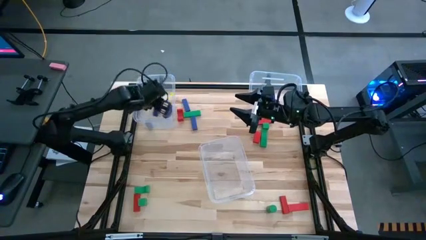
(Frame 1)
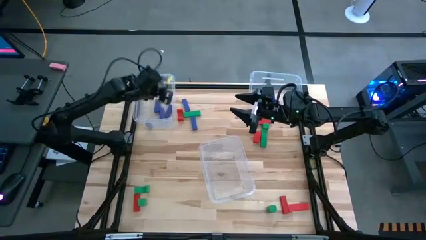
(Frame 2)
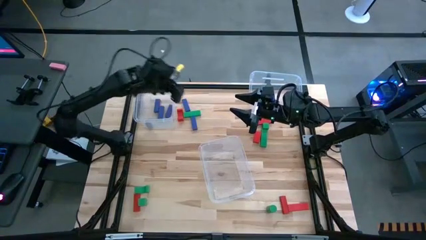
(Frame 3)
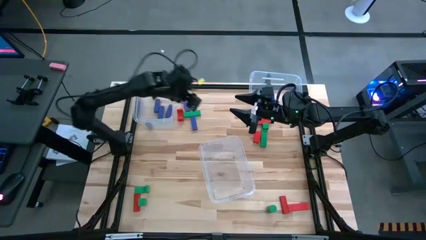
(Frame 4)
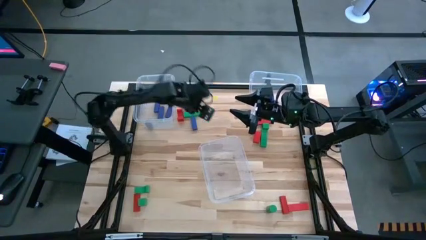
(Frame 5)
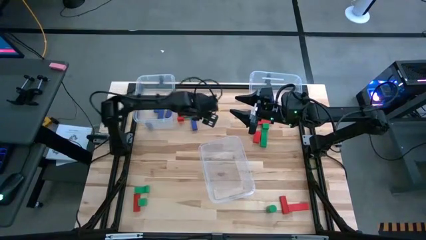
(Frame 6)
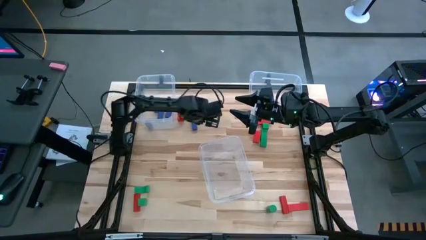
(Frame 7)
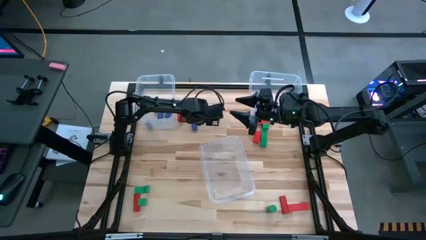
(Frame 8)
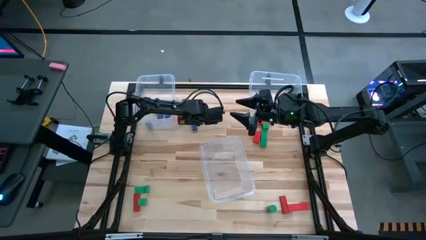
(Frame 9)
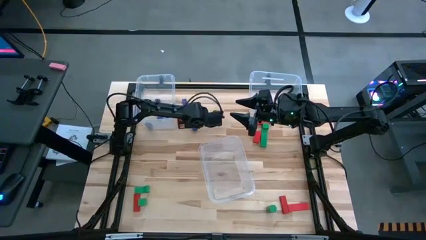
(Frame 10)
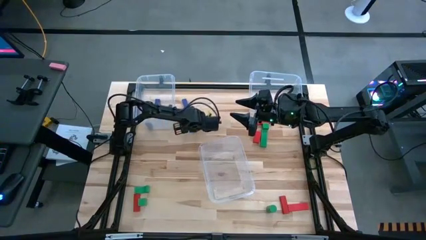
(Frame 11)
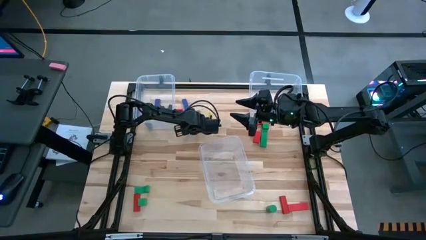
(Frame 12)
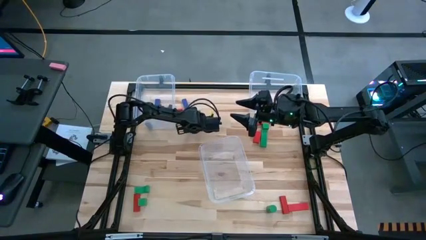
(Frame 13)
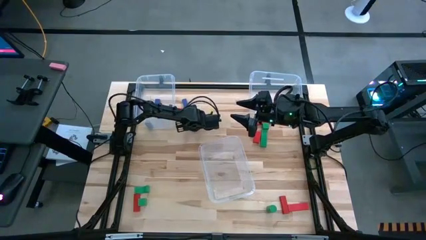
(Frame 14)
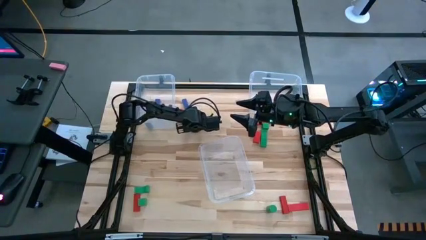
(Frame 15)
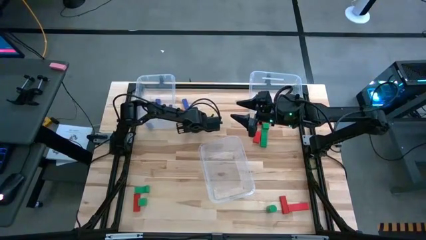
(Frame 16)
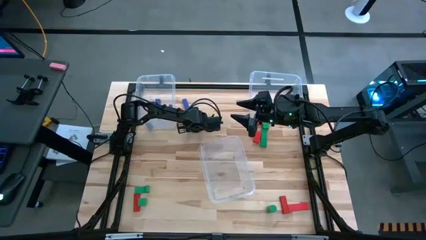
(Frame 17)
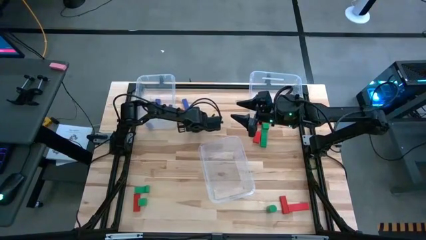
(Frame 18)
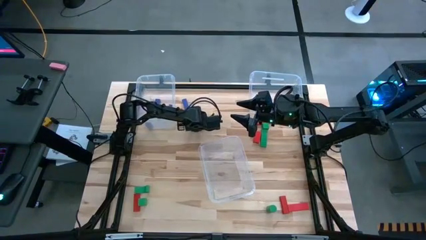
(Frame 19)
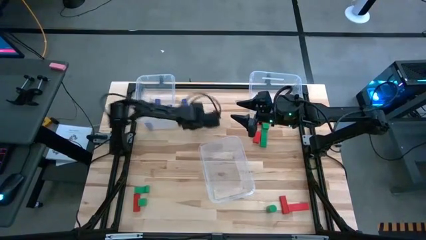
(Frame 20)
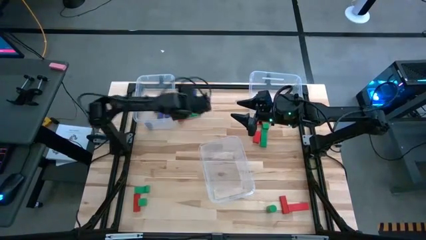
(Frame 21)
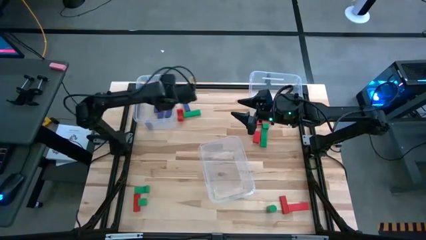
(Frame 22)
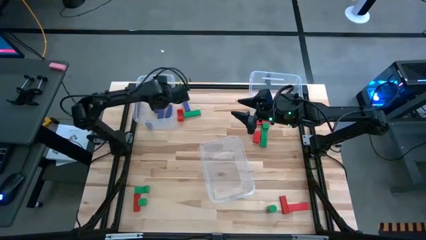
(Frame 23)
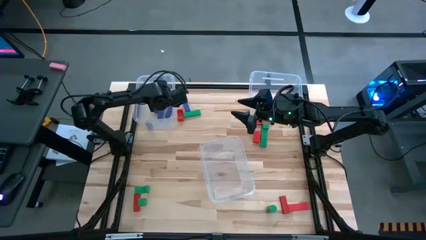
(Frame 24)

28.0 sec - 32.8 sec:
Task: Sort blocks
Put the blue block into the top left transparent bin

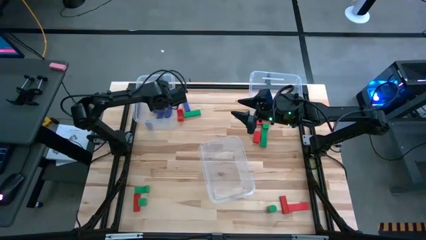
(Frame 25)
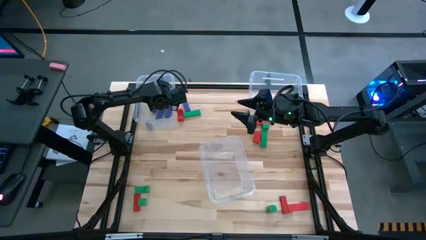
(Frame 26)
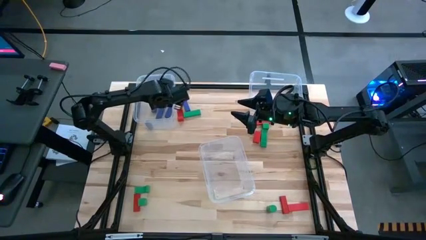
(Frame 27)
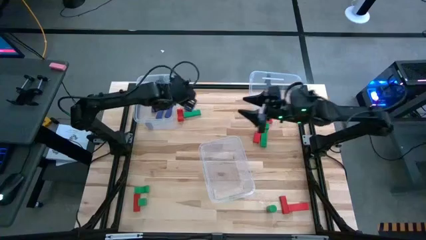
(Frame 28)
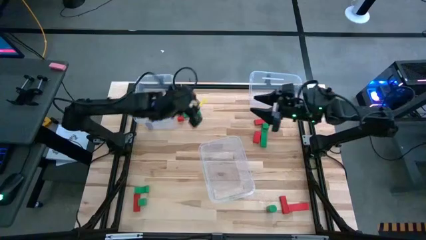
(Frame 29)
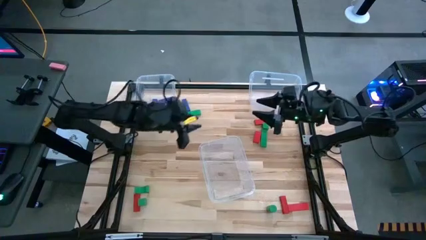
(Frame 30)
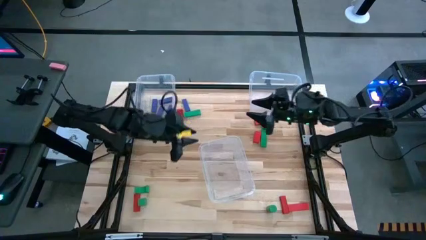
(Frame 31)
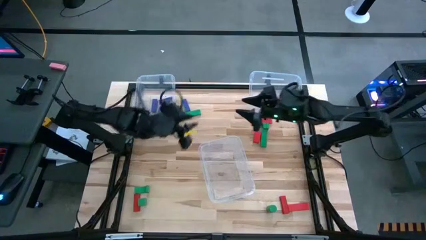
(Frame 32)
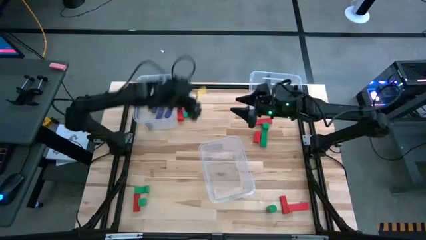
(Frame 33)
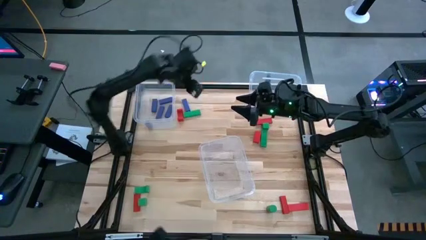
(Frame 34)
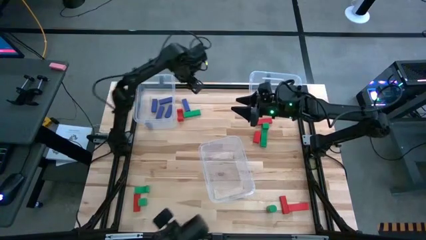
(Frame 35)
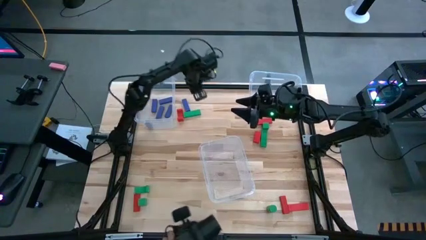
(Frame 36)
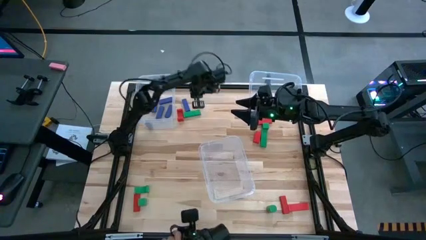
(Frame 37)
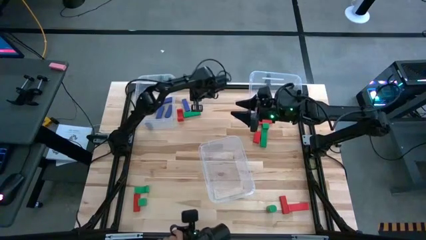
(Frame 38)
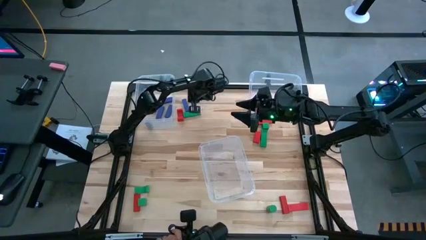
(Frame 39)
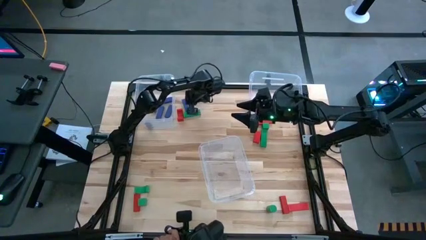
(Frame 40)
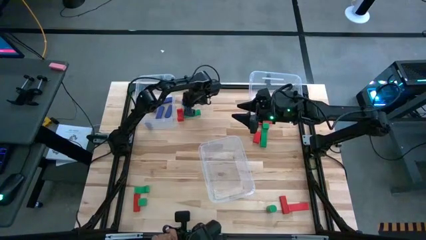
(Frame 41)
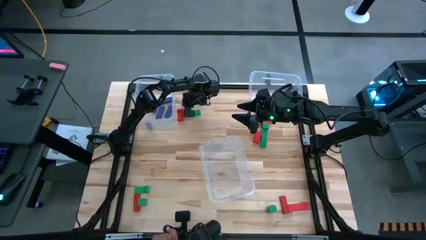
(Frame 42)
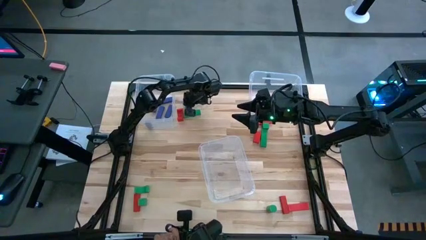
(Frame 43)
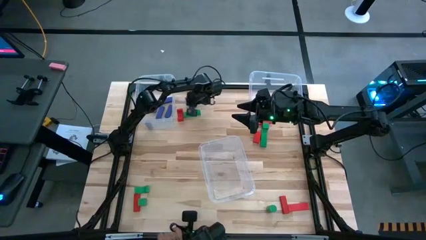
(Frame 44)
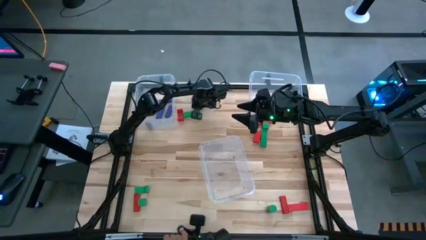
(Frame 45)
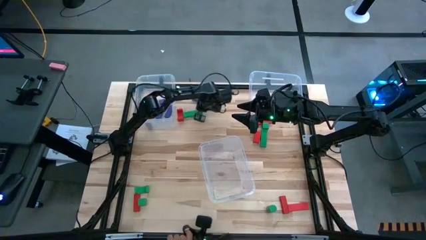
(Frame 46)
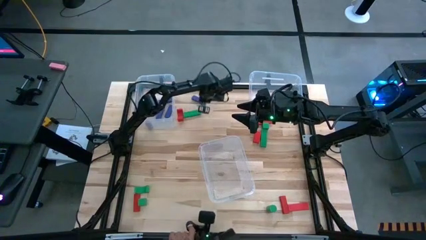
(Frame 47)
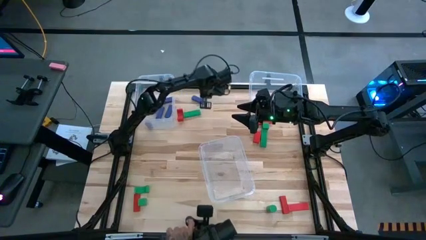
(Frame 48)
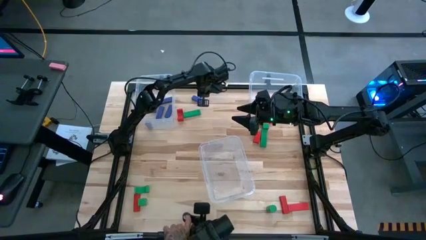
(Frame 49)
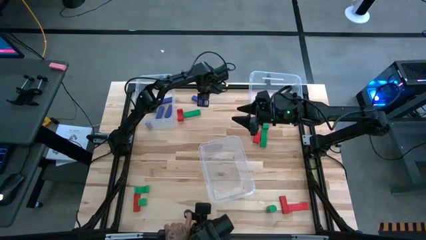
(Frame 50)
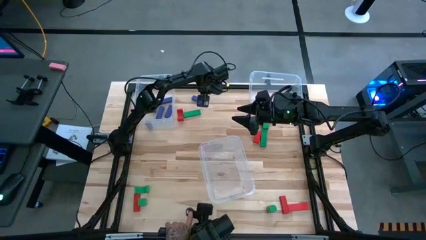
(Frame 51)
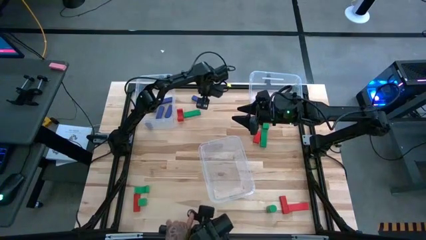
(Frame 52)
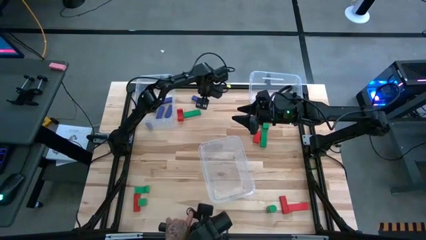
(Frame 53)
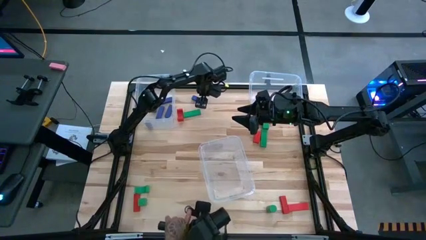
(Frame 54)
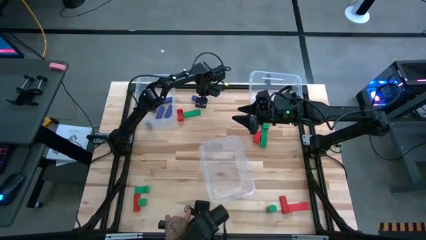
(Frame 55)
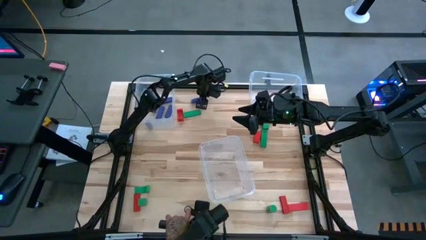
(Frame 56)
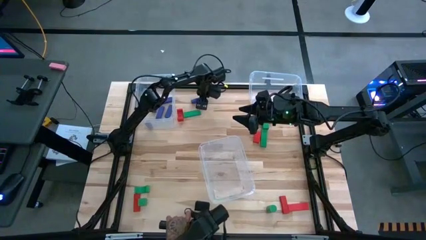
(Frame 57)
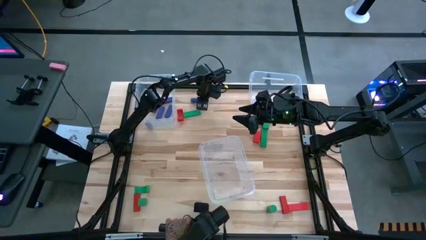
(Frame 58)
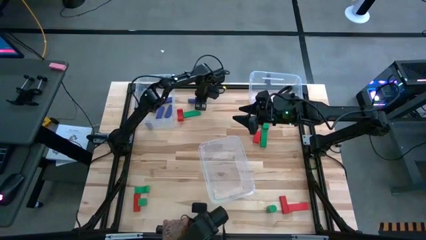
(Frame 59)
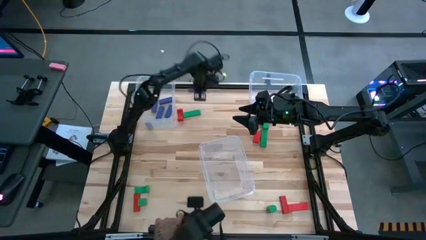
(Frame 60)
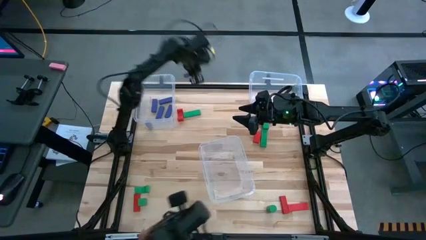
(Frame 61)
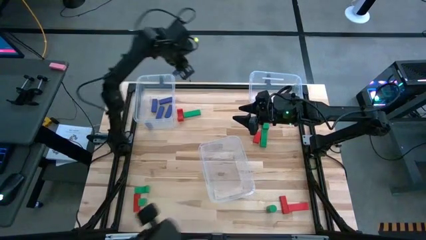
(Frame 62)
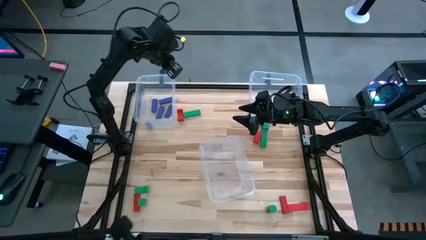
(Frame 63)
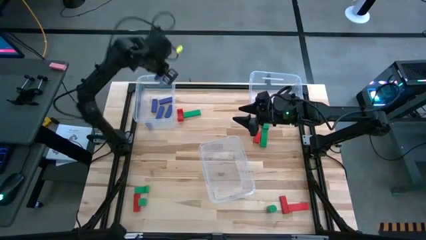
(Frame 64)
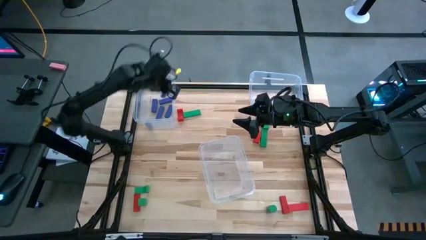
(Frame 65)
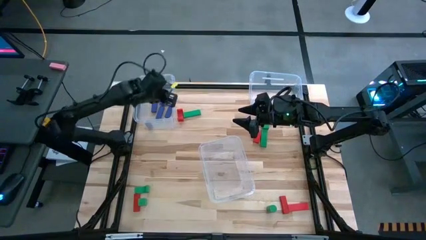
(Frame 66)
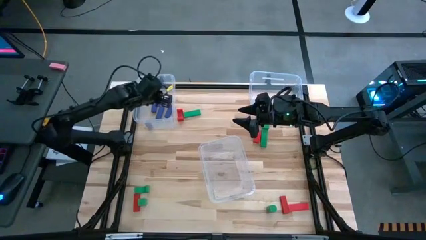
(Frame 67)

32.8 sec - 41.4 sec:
Put the blue block into the top left transparent bin

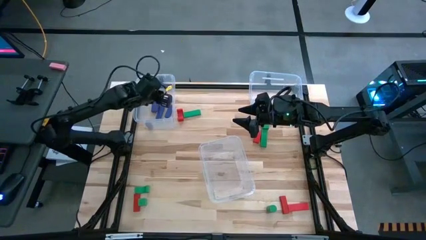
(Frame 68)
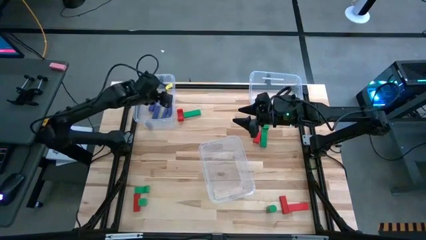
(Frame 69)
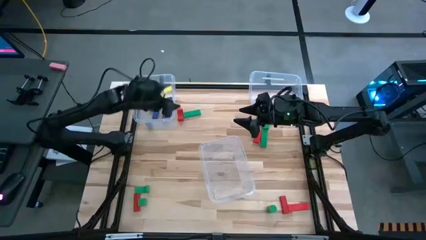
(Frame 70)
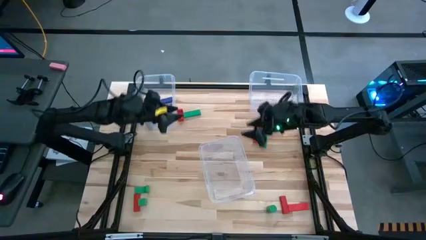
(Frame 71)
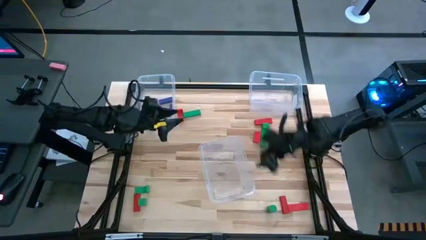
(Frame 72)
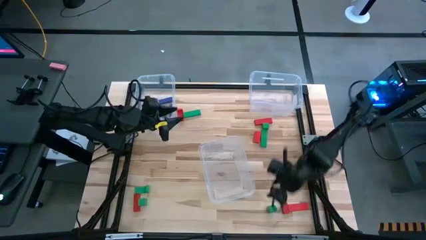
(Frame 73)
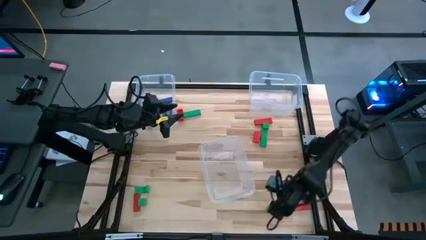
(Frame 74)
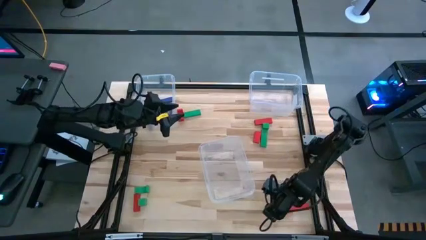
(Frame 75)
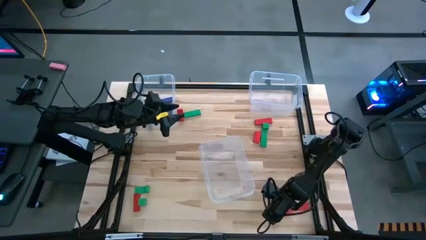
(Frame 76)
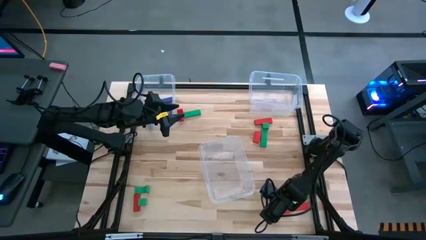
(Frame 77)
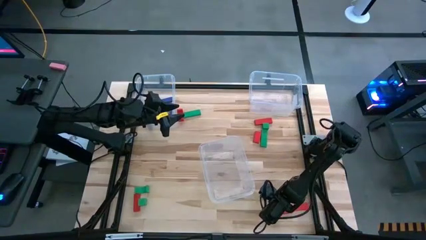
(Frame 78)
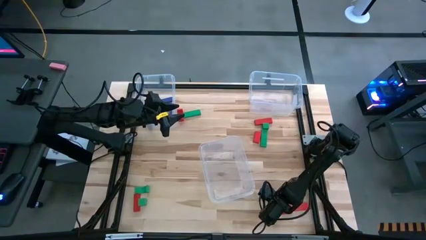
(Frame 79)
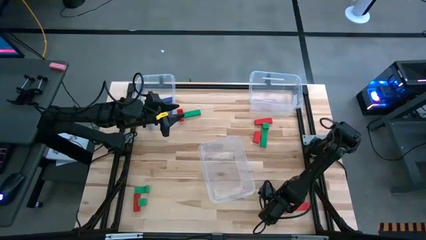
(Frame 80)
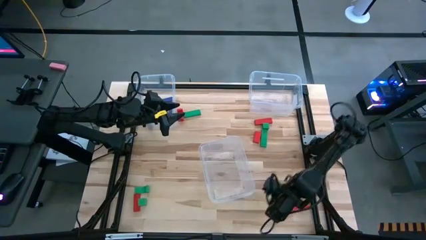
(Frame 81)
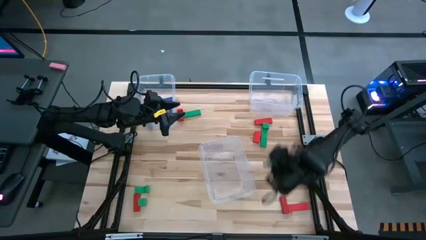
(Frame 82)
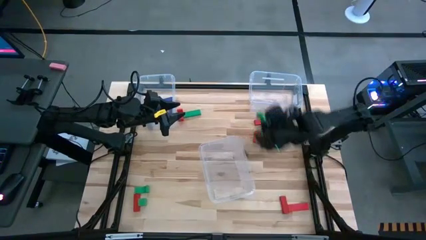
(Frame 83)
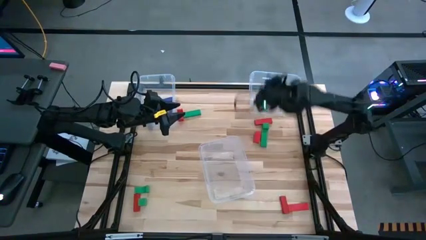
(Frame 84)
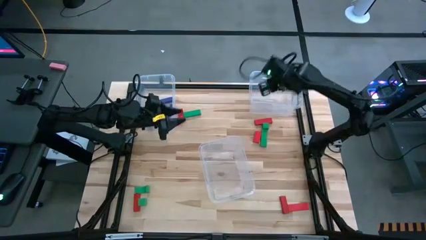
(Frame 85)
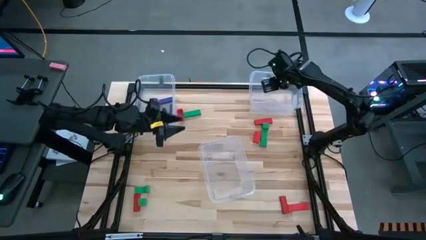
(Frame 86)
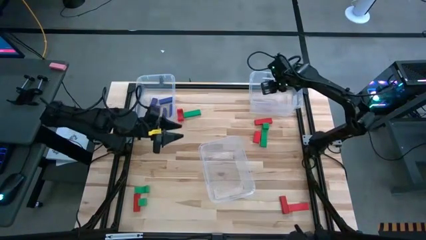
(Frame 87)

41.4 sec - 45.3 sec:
Put the green block into the top right transparent bin
